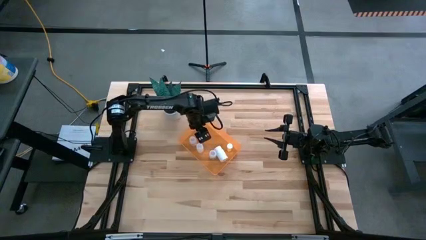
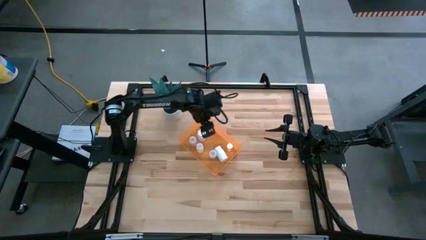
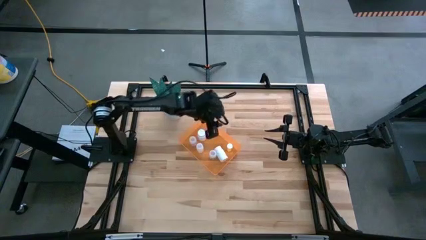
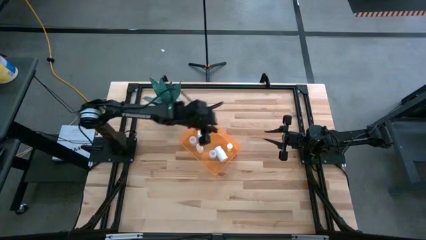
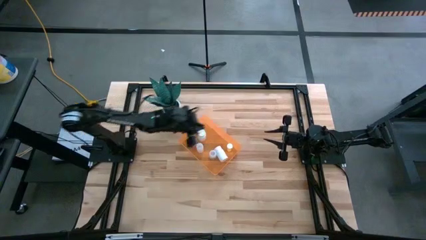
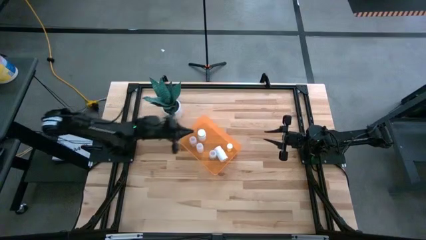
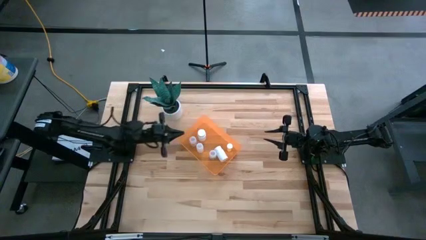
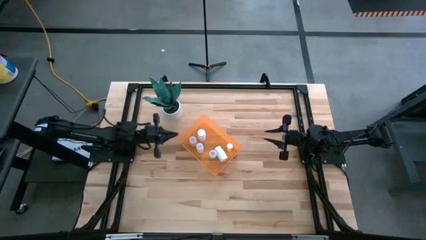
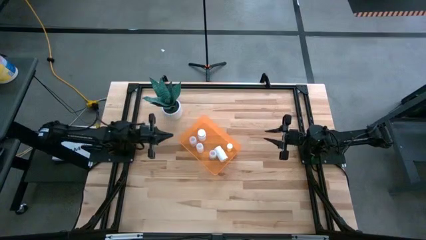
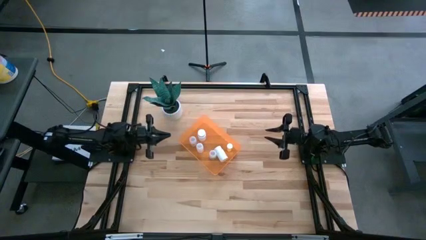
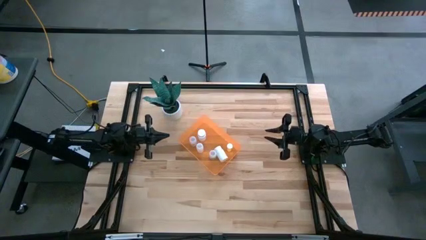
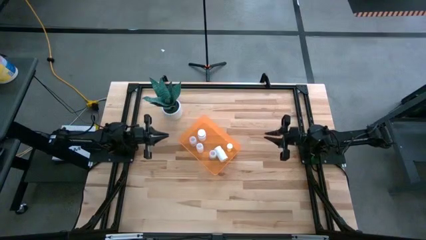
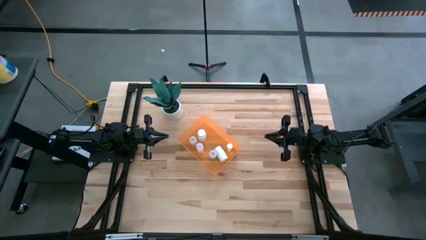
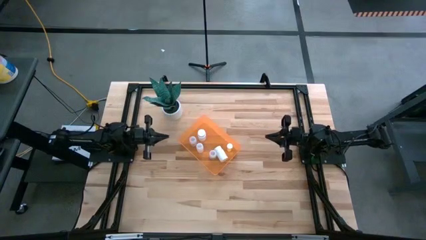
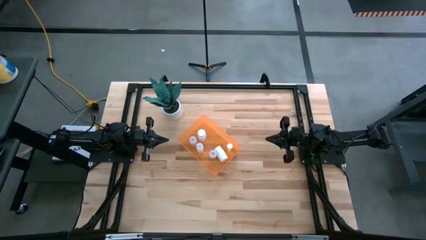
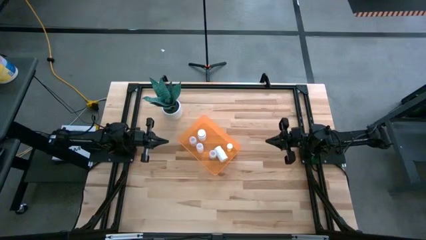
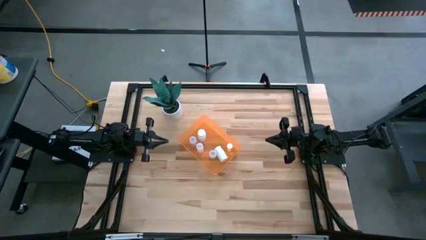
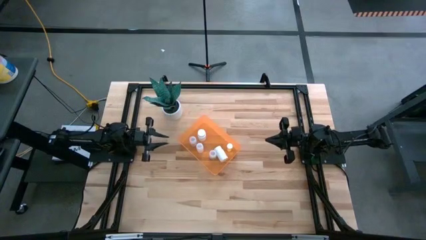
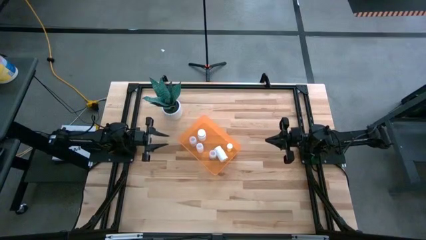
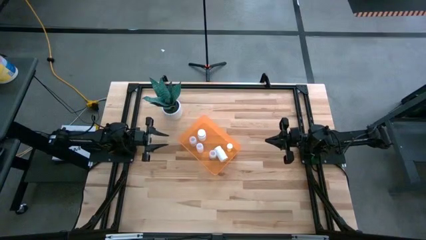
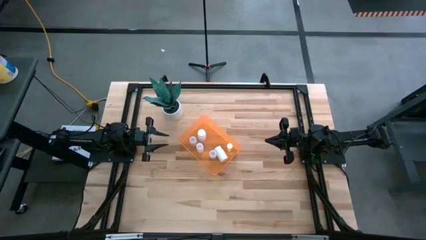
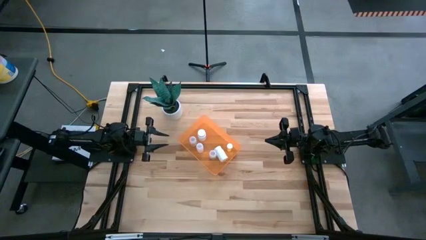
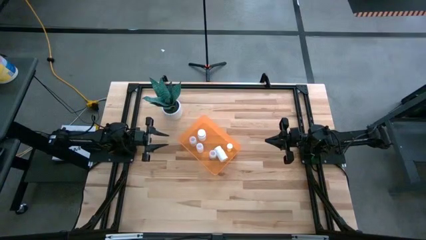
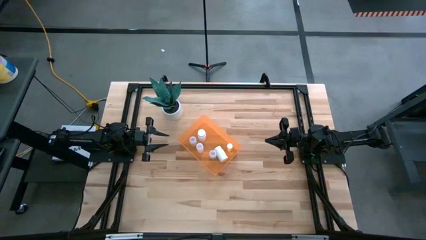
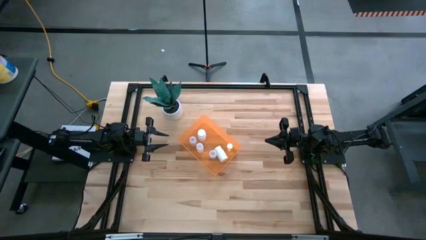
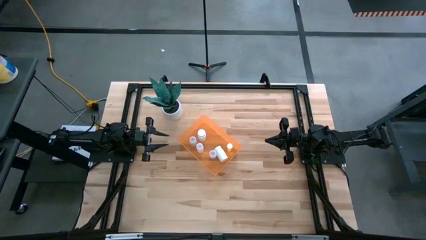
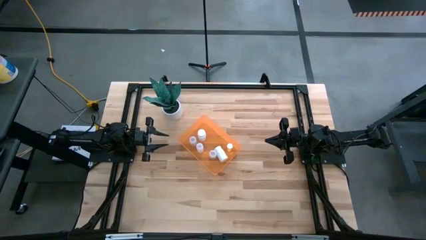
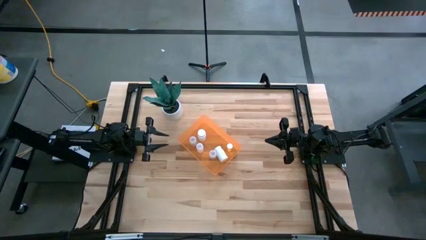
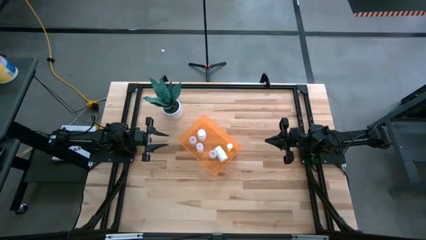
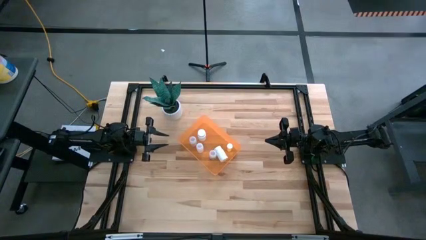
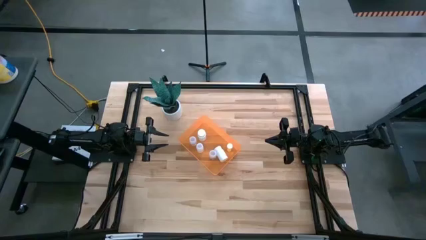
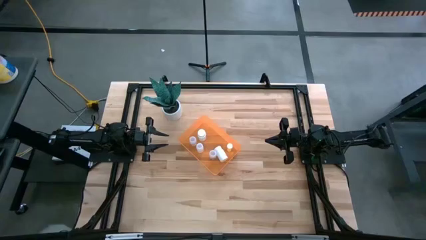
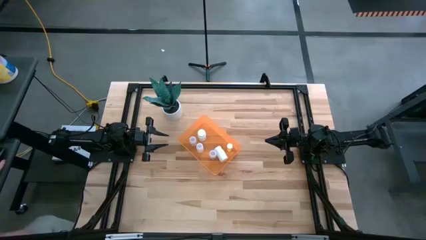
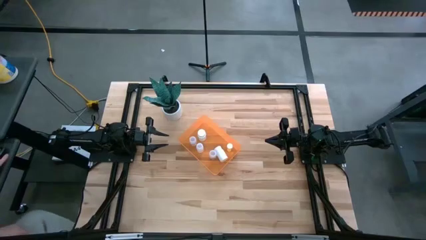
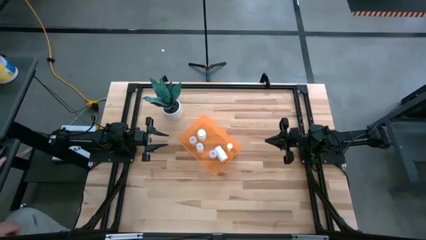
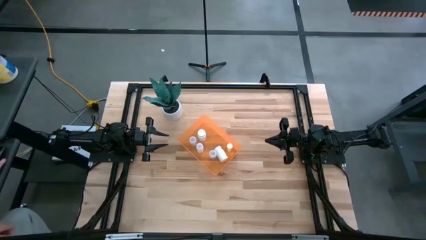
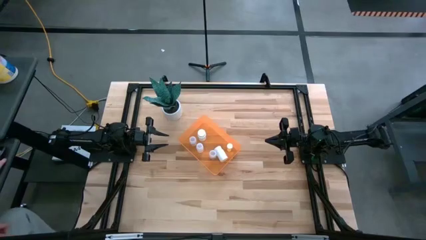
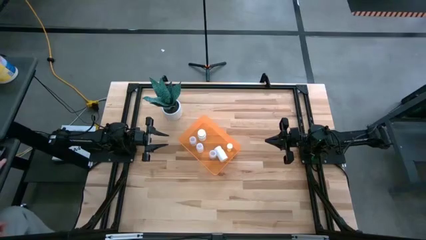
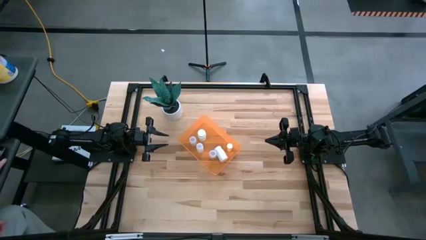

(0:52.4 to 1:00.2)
Task: Pick and place pill bottles into a basket
Return to Home Position

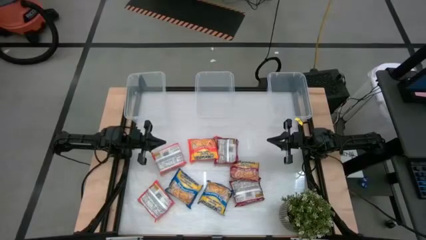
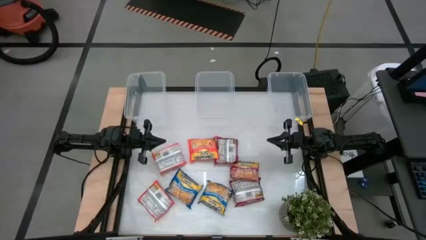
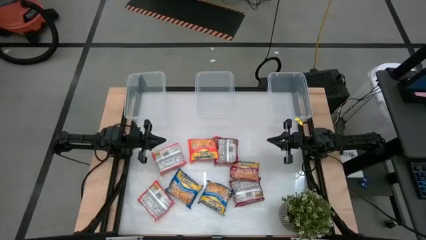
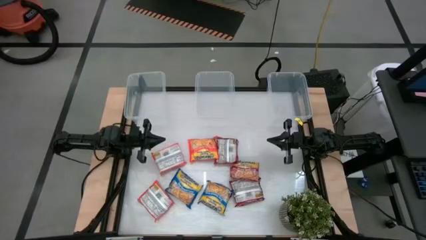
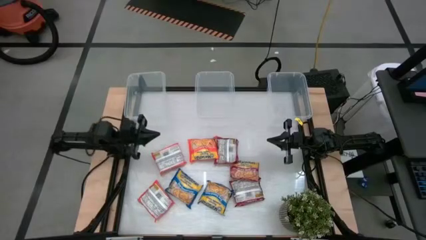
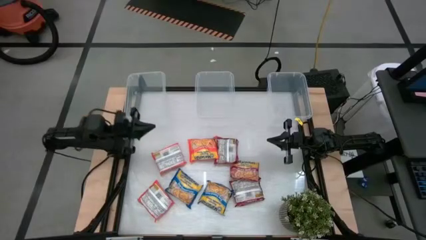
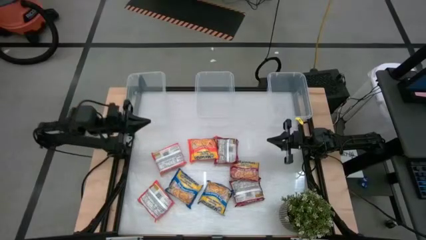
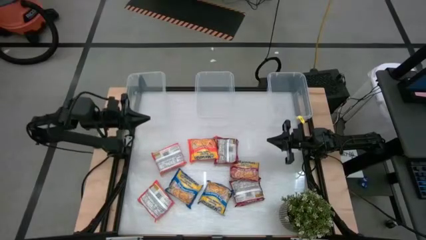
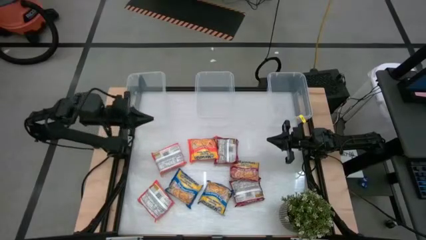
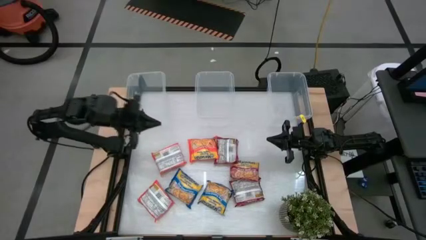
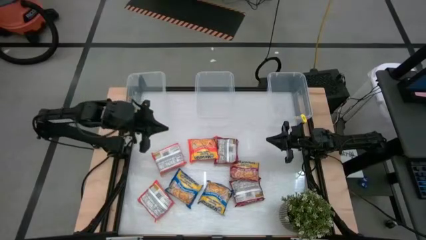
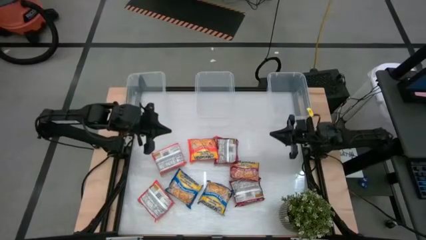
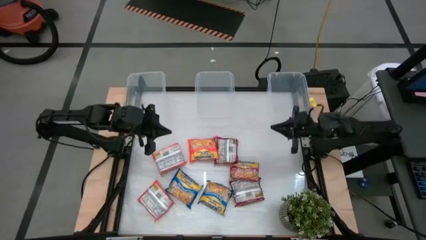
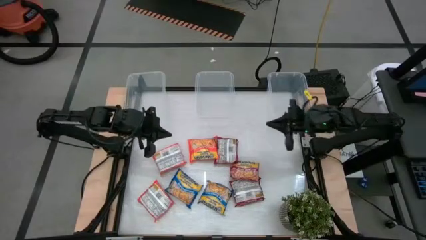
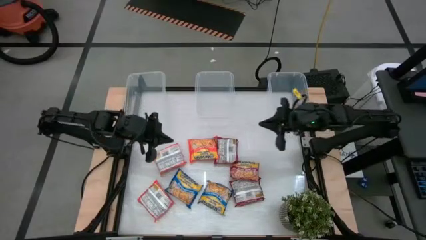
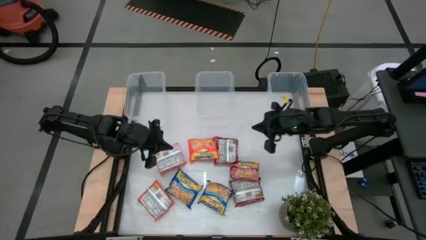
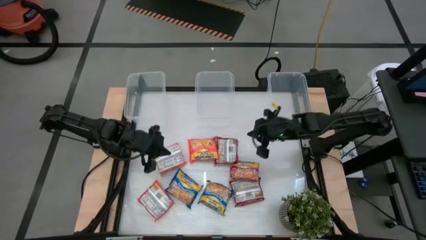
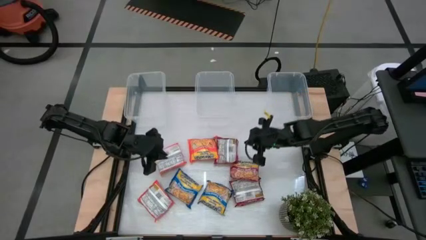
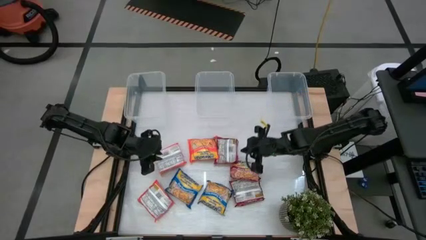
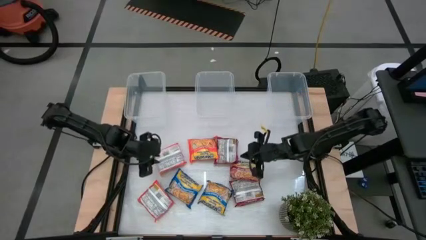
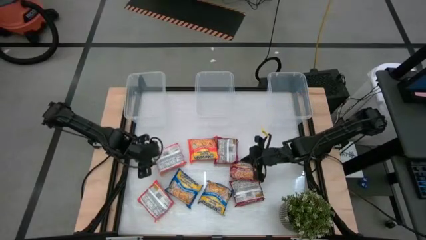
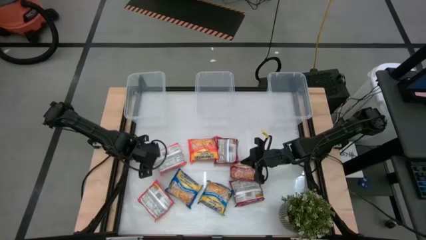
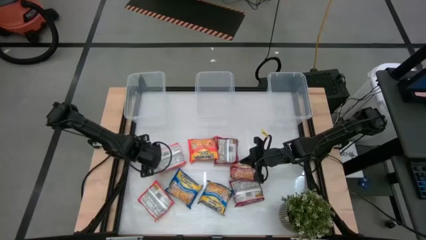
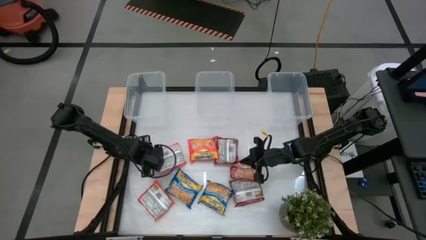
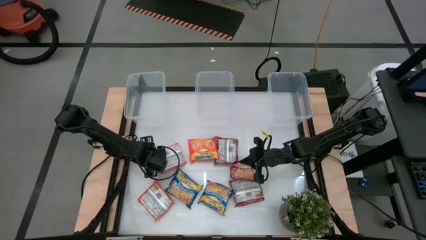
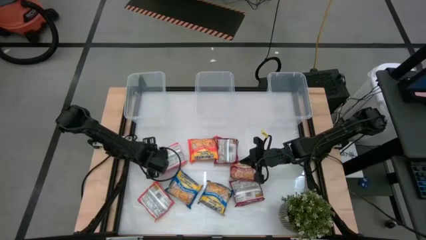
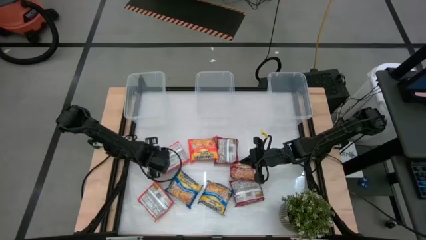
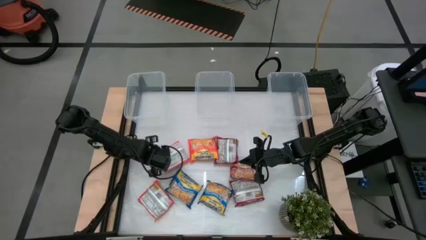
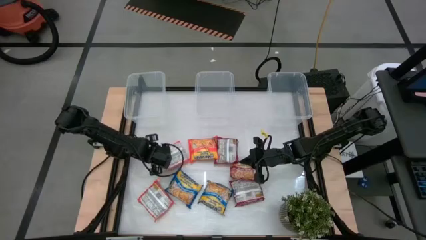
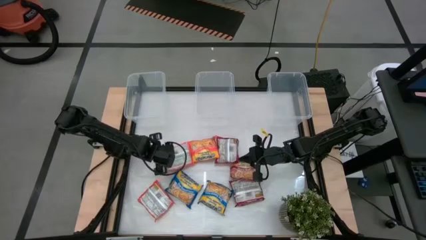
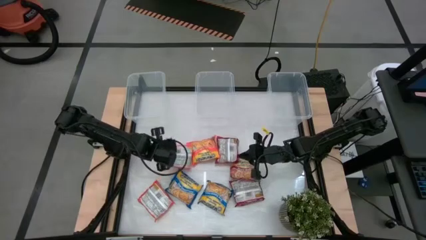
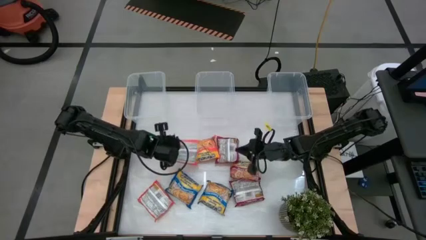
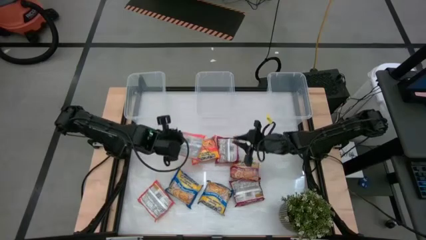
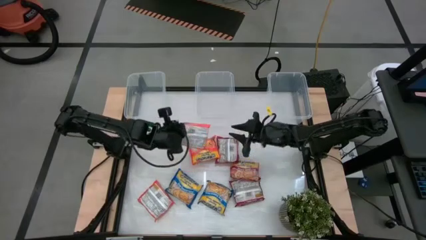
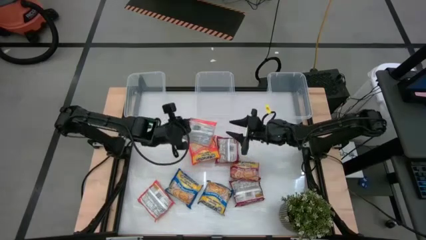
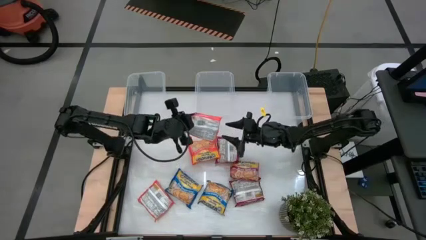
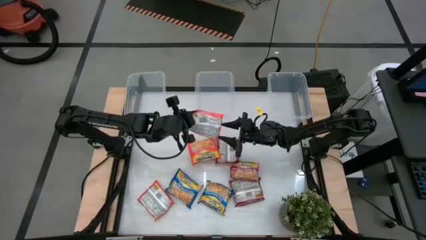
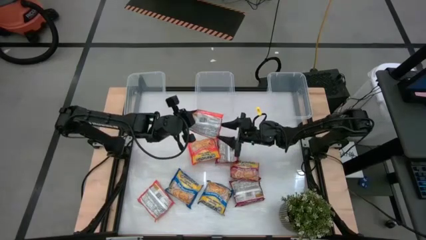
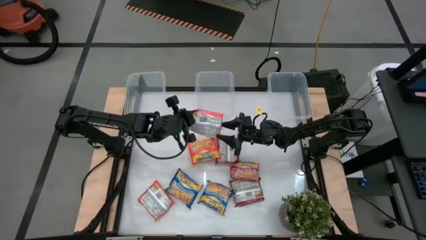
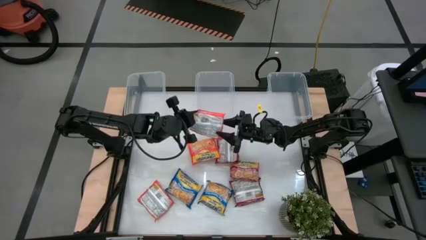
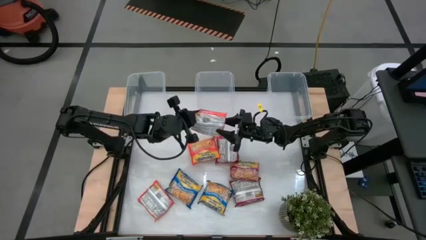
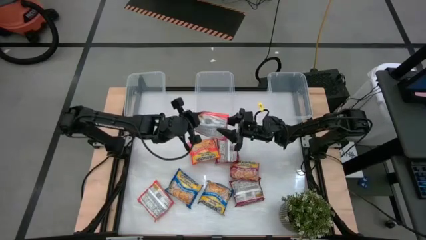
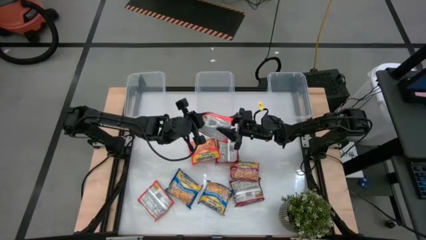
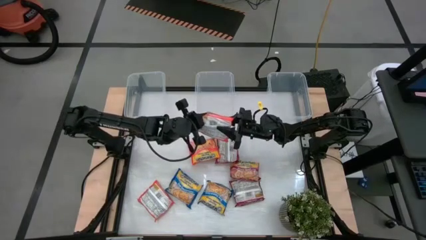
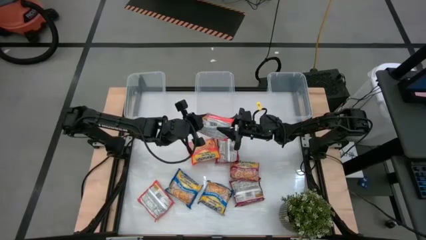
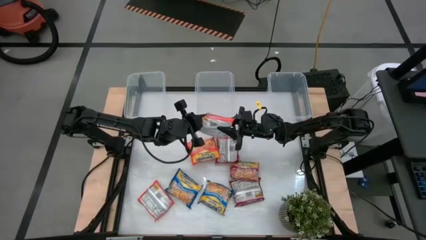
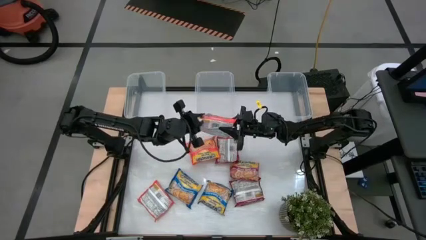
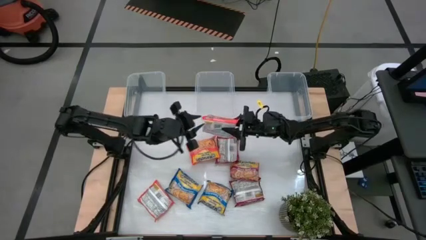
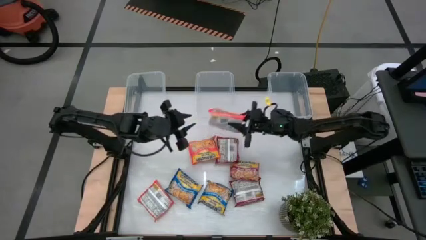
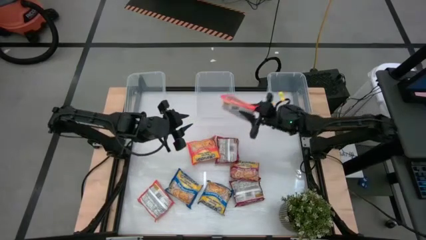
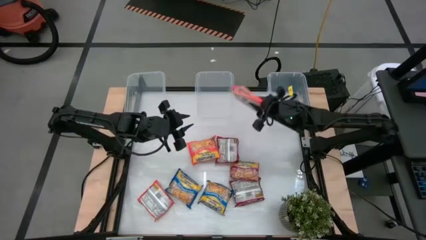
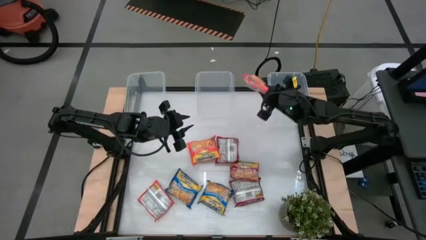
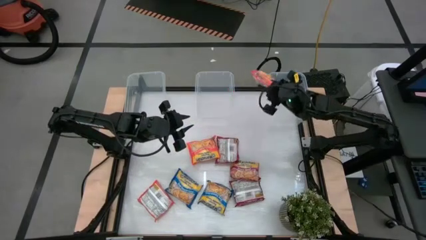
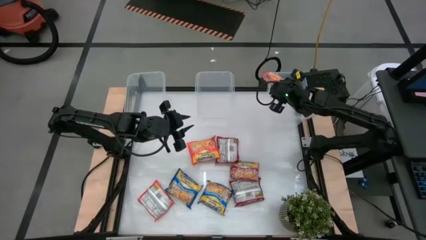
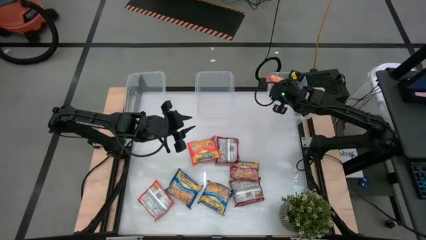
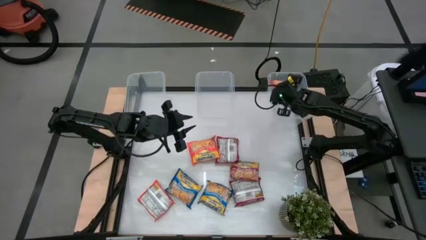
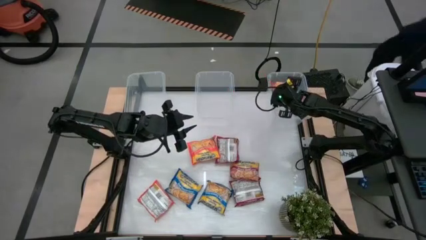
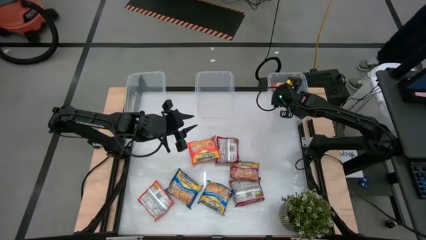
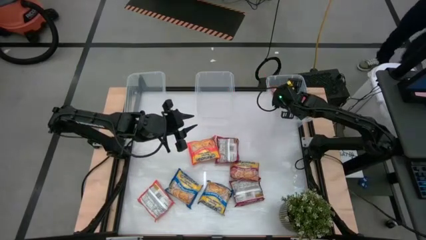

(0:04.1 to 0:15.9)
Task: Sort Maruchan noodles
Put the top left orange noodle pack into the right transparent bin
